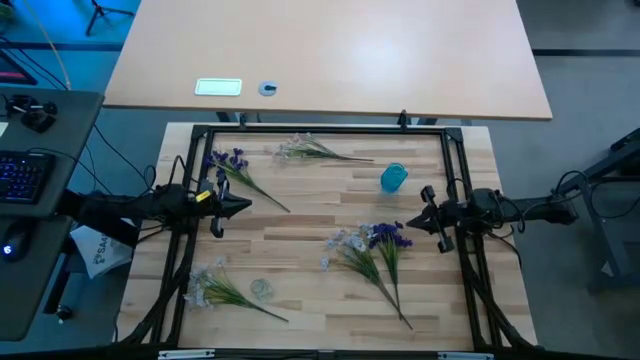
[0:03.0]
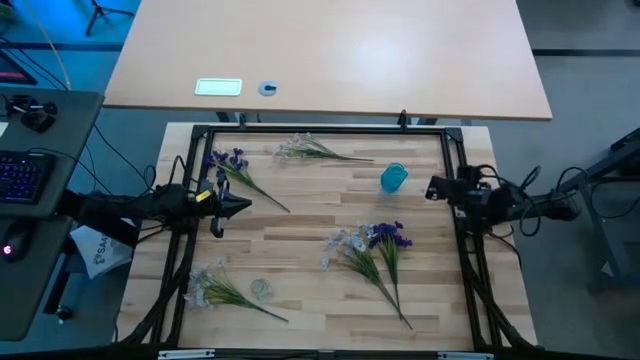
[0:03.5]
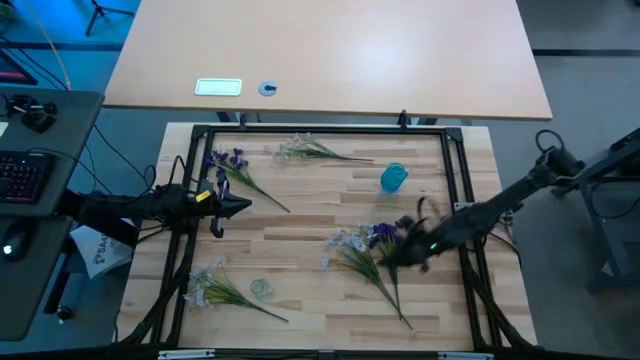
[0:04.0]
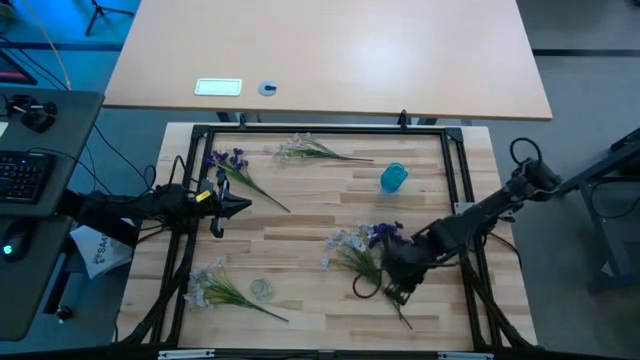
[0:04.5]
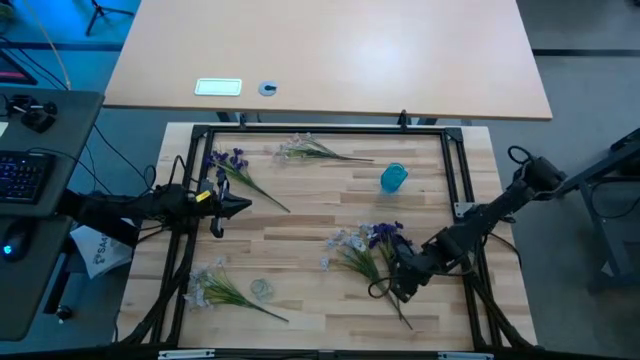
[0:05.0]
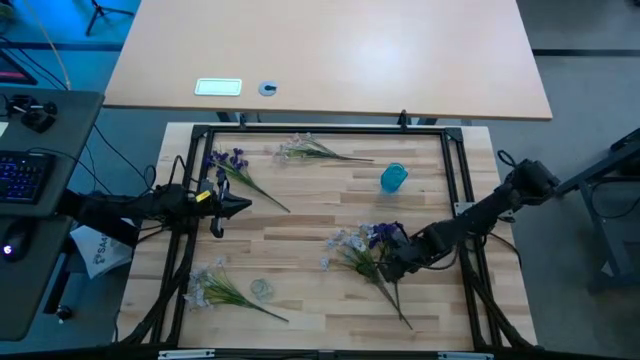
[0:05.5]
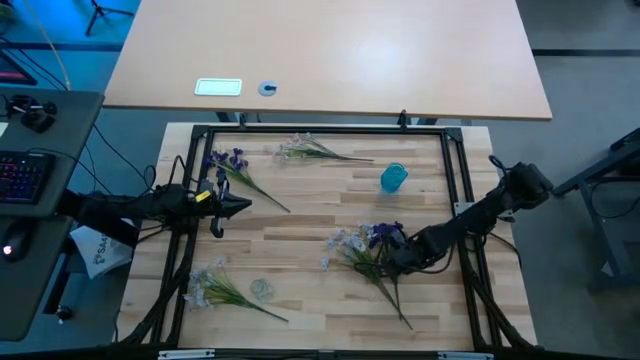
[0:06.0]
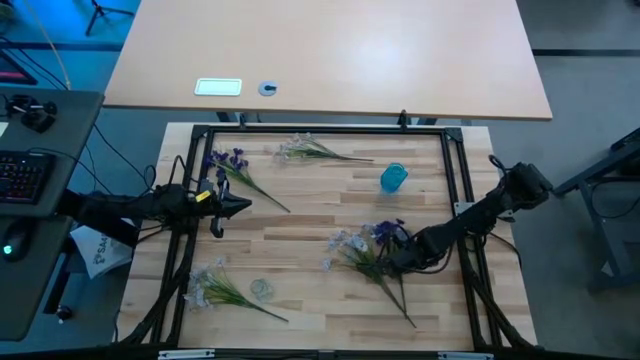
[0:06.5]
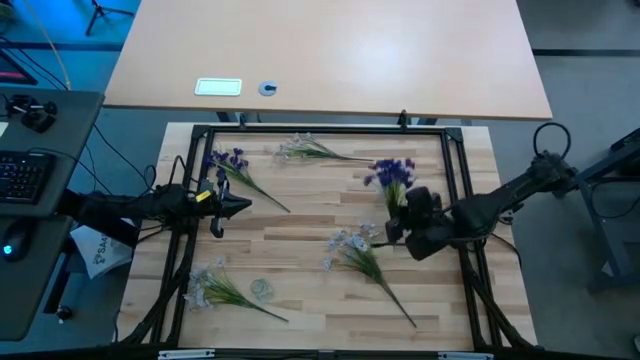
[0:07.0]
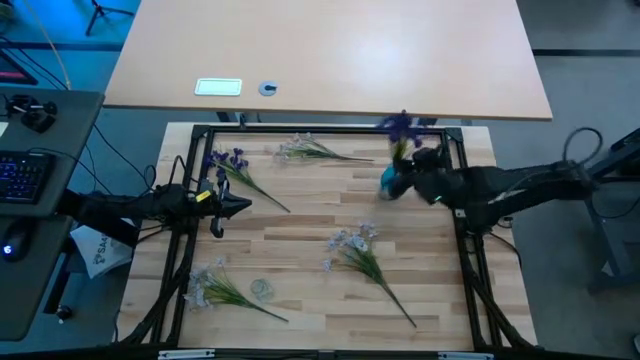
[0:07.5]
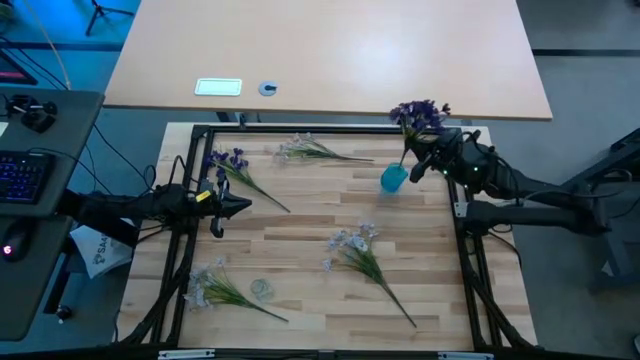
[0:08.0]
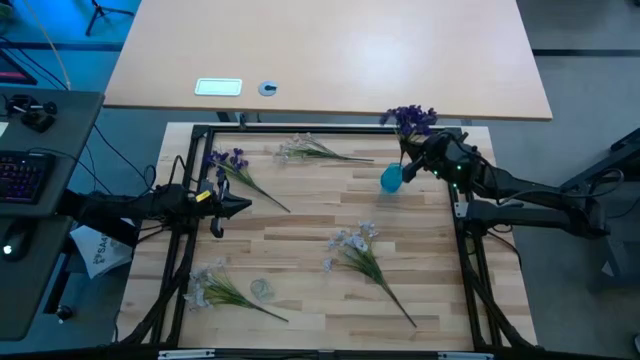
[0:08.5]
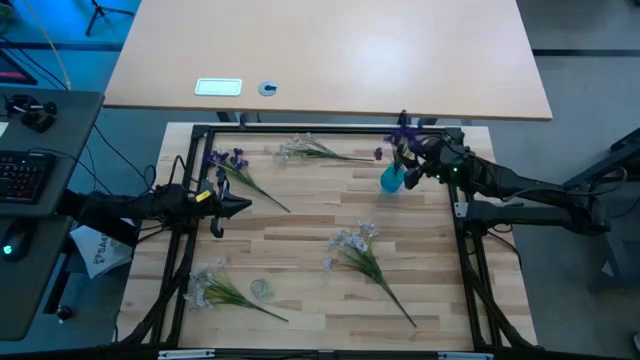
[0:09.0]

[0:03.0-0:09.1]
Task: Sort flowers into vase by color
Put the bottom violet flowers into the blue vase

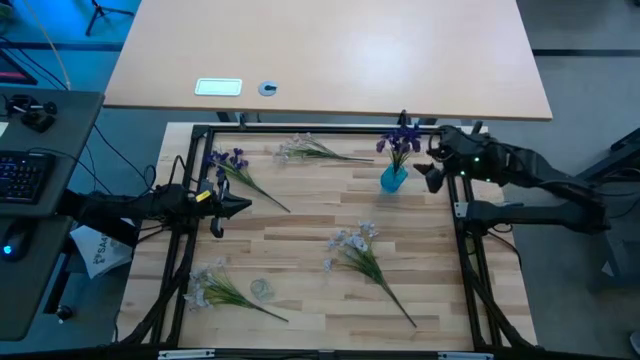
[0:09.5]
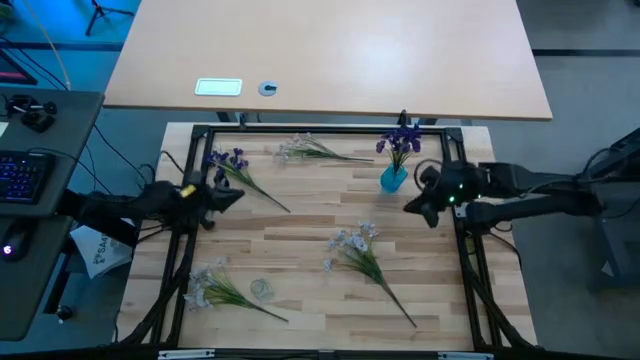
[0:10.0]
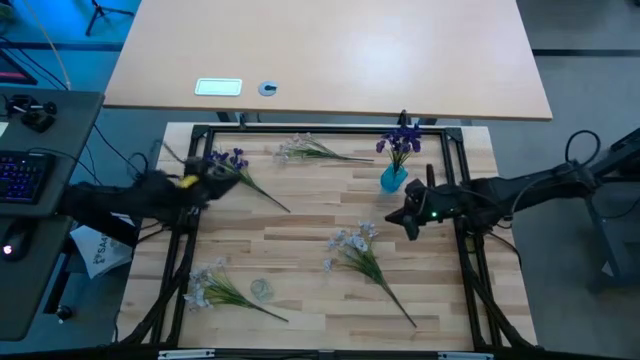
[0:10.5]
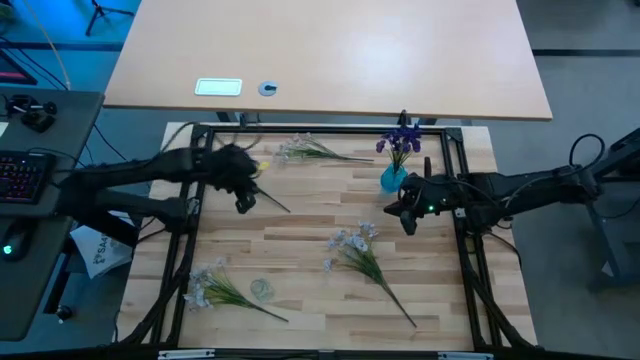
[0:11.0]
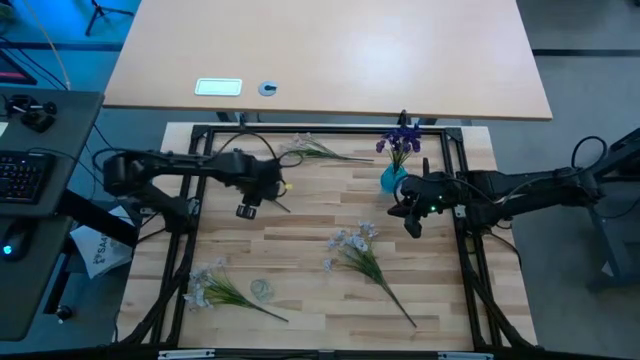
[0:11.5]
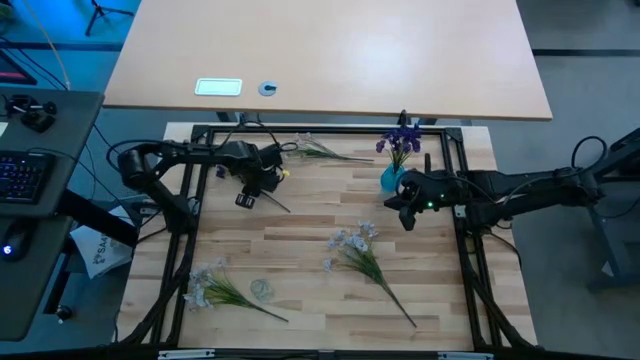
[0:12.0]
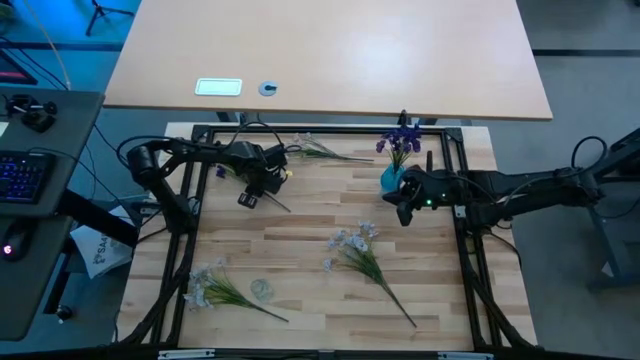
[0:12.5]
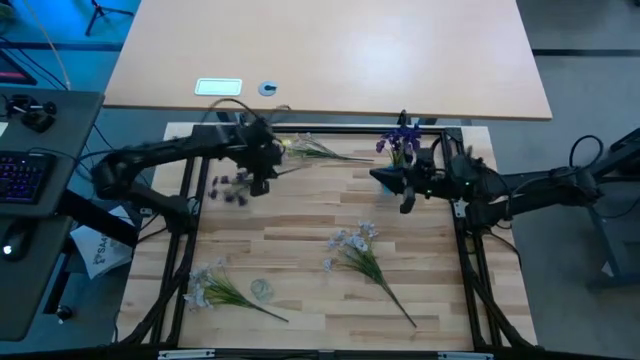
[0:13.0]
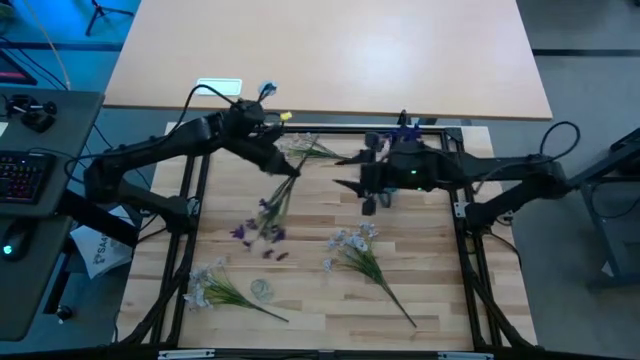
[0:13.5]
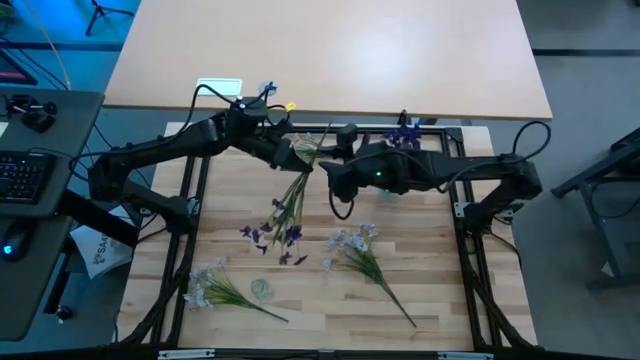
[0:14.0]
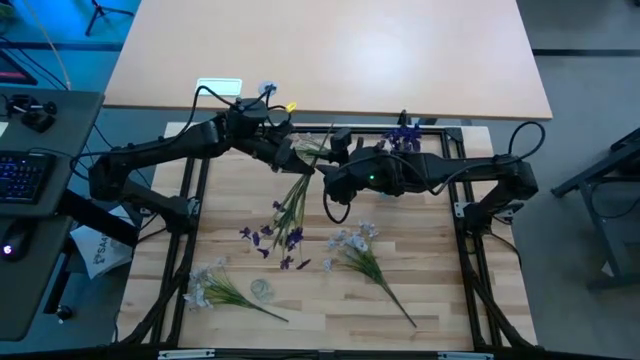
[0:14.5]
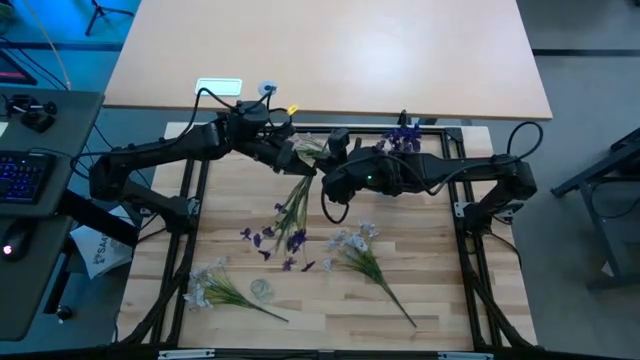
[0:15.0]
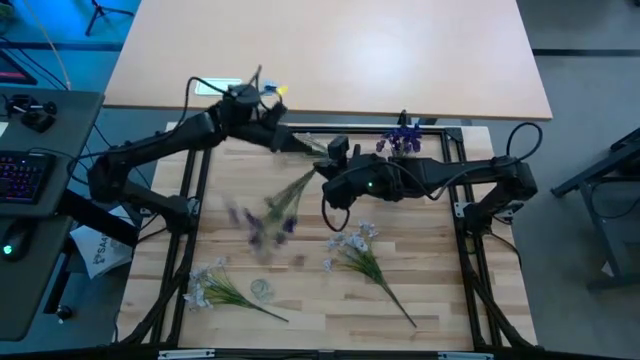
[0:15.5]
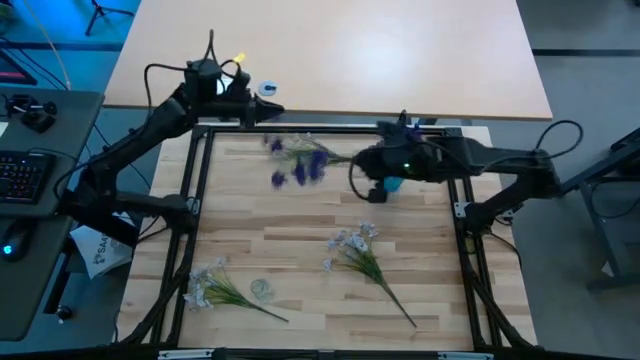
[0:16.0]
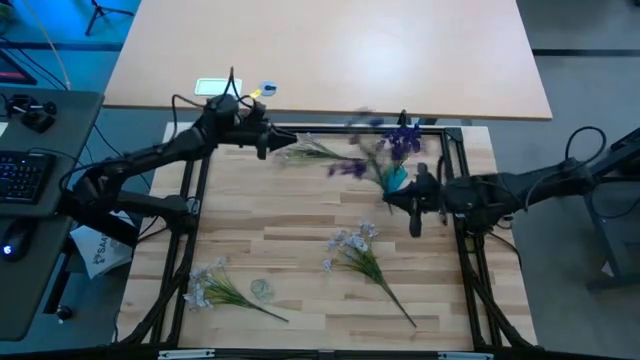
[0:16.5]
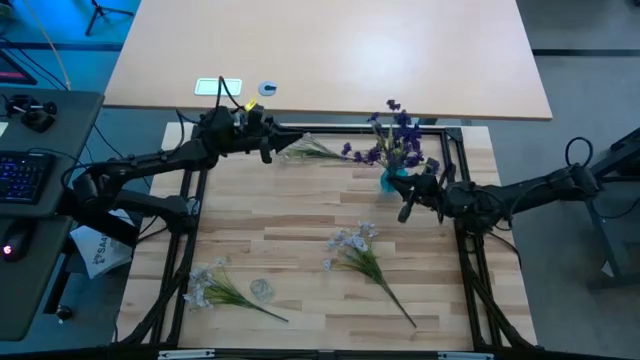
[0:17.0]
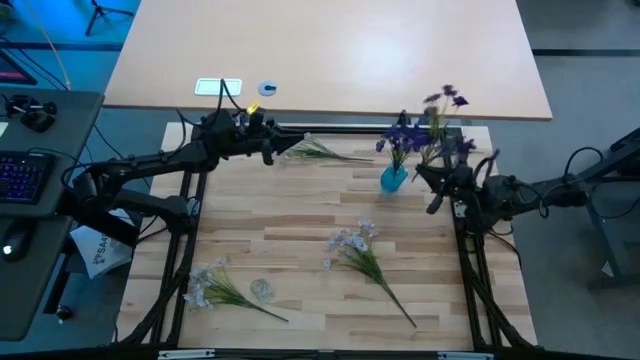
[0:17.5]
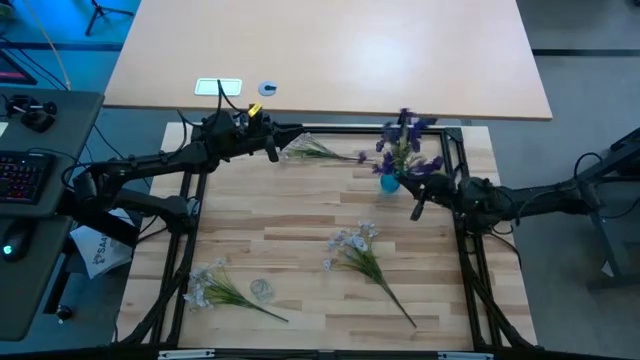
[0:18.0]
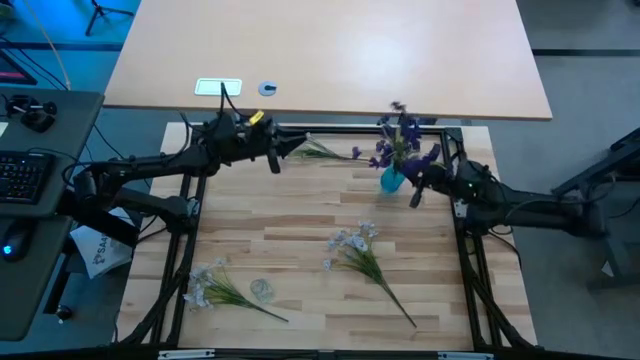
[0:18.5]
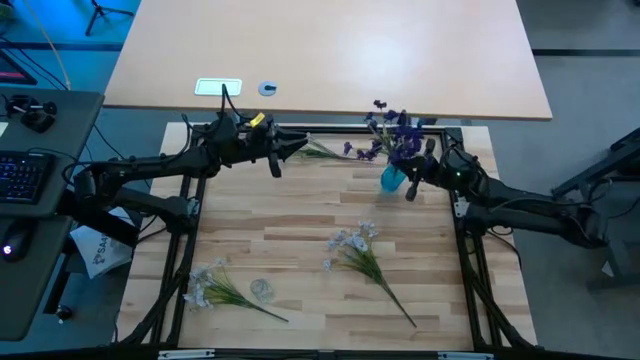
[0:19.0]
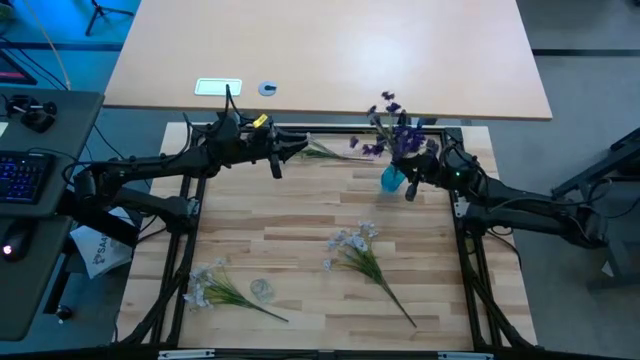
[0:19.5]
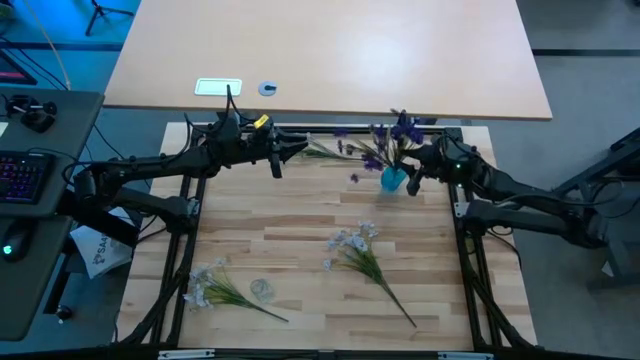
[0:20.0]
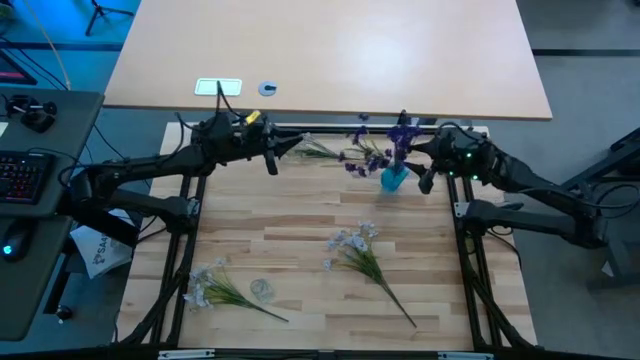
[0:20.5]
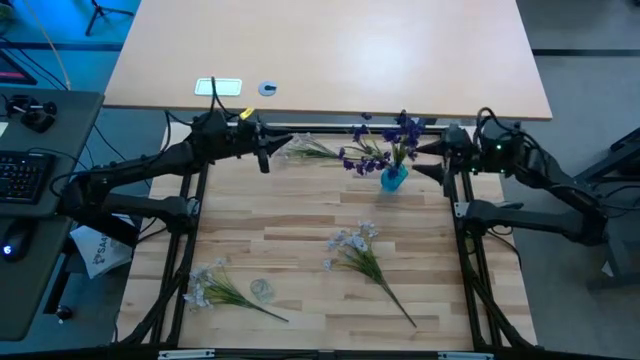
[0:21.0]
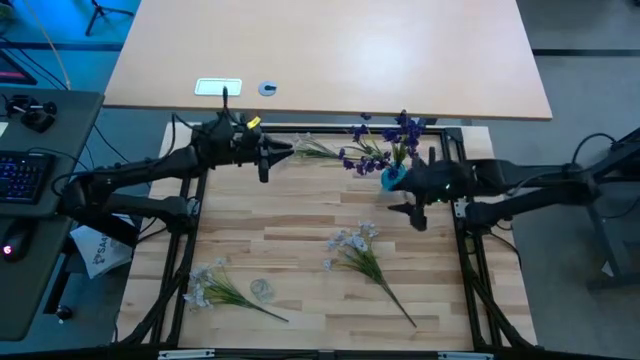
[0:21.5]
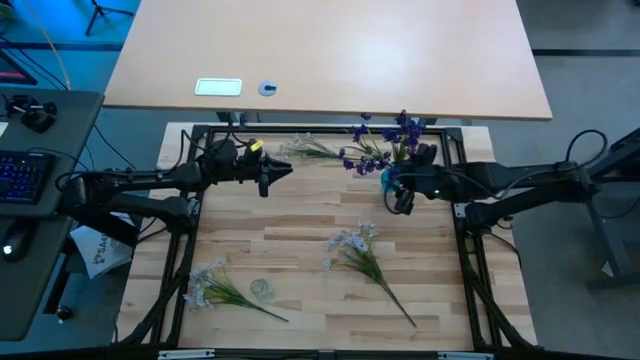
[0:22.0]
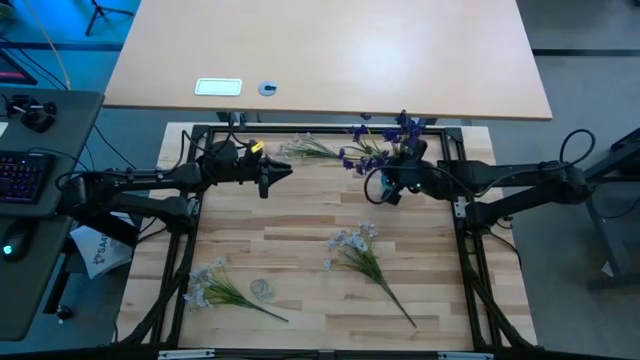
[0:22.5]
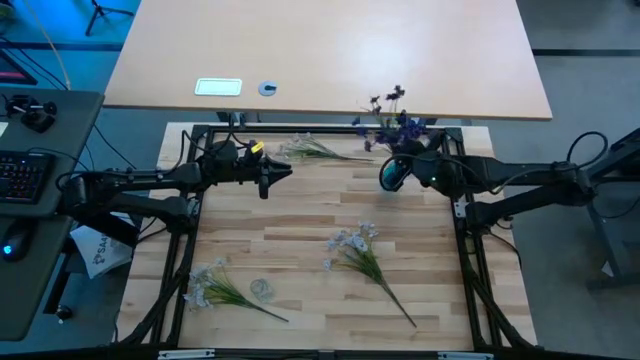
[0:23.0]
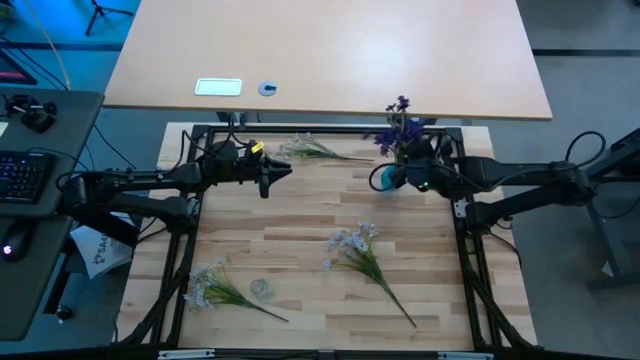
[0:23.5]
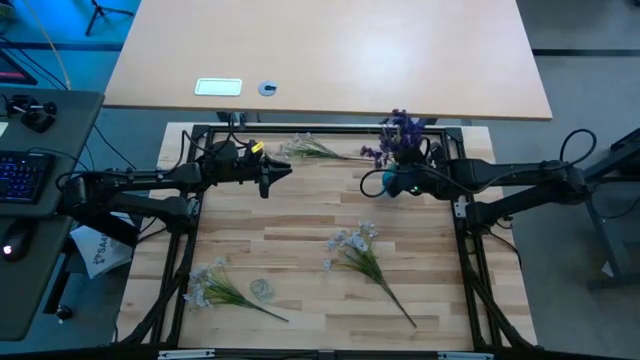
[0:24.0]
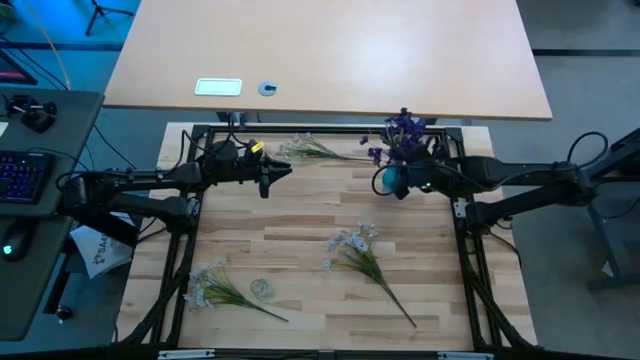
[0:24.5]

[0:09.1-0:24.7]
Put the violet flowers into the blue vase
